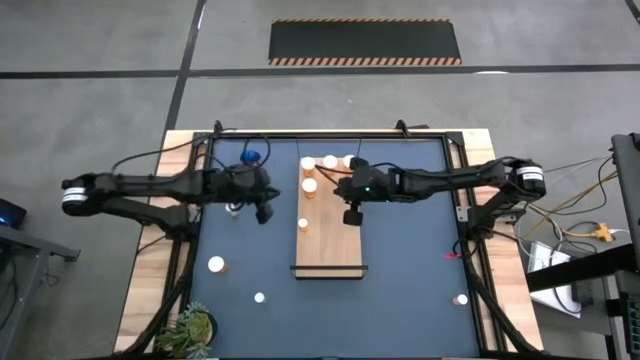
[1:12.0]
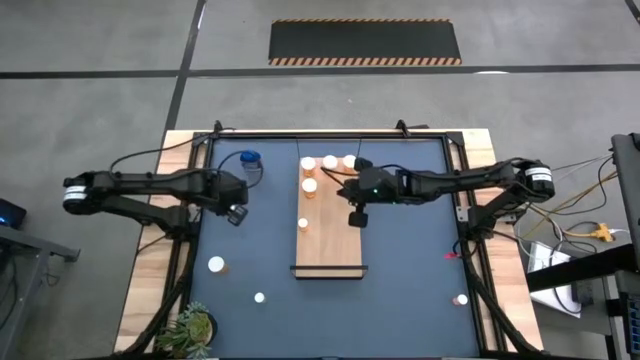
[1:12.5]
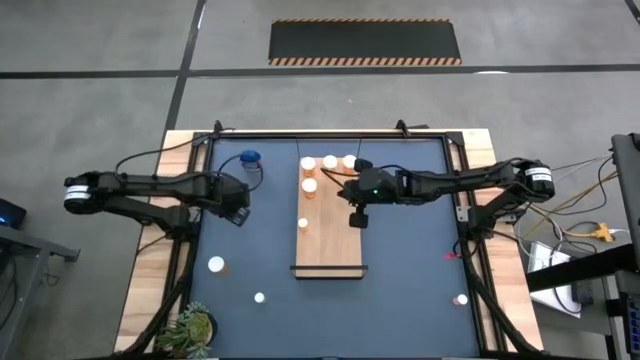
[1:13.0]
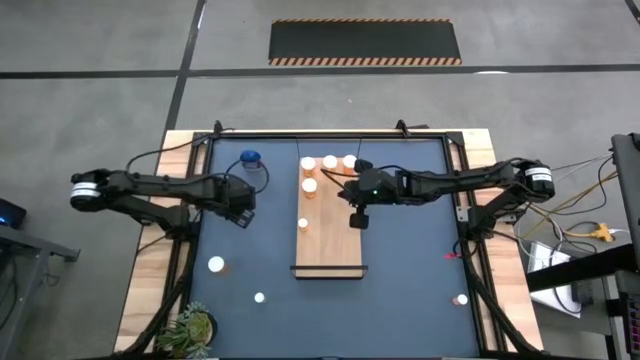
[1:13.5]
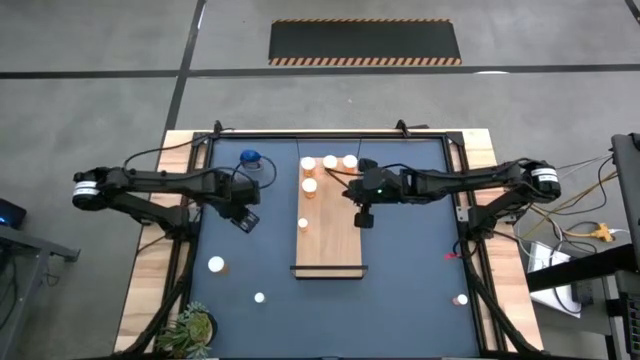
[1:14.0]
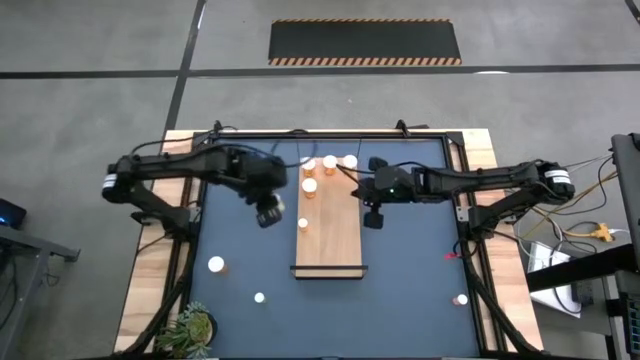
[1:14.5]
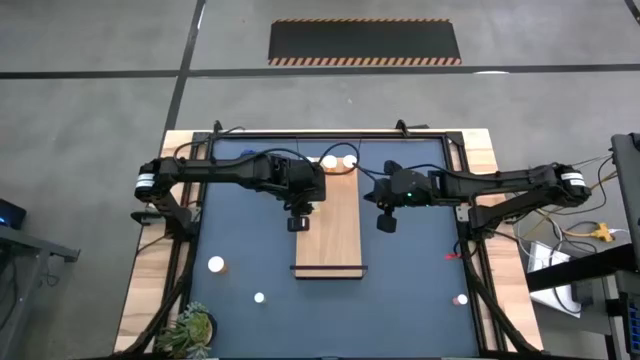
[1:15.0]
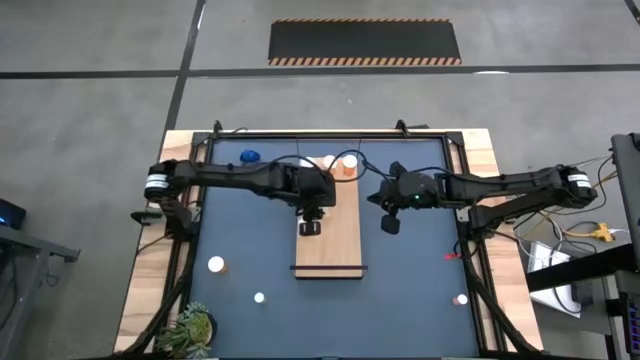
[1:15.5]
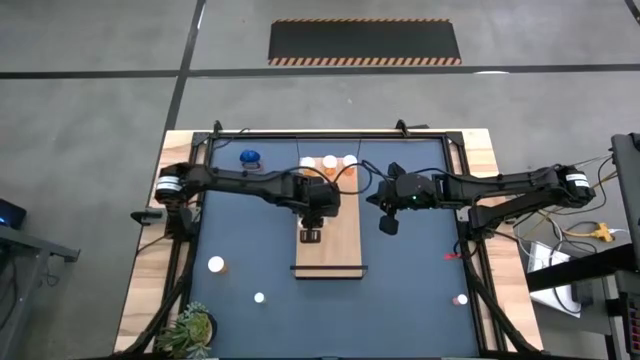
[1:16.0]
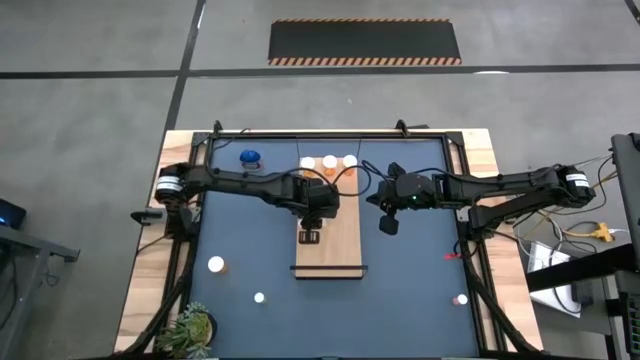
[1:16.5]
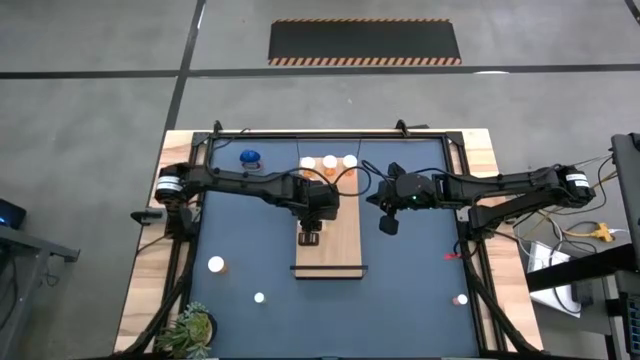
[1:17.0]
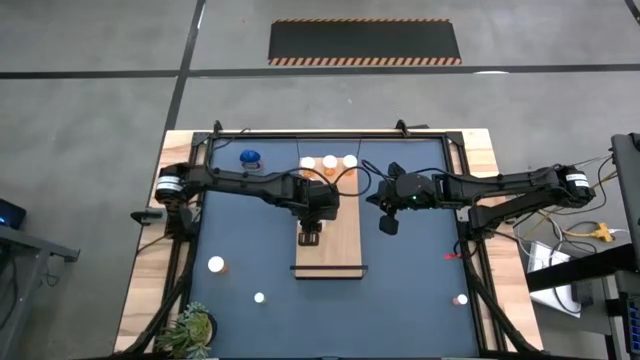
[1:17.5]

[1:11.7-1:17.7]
Task: Pick and place medicine bottles onto shelf by color
Put the small yellow pill bottle on the shelf

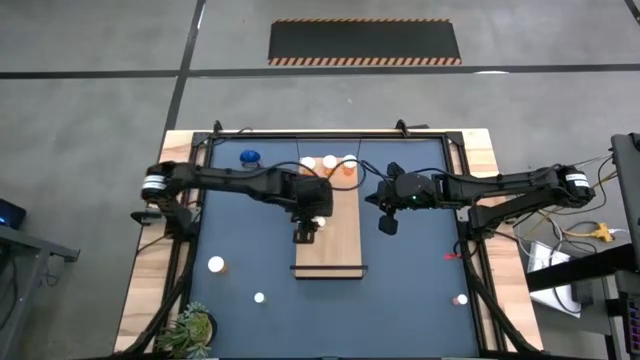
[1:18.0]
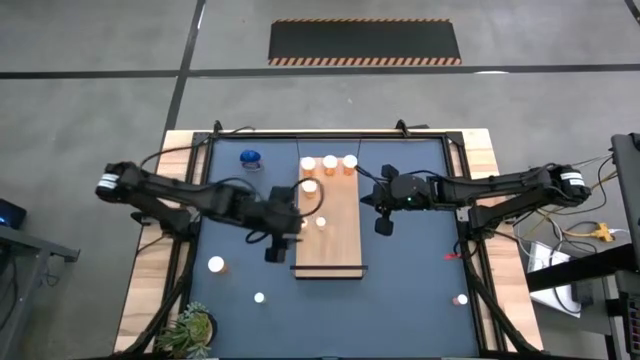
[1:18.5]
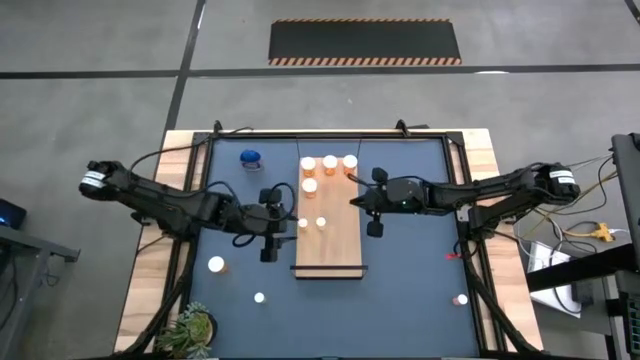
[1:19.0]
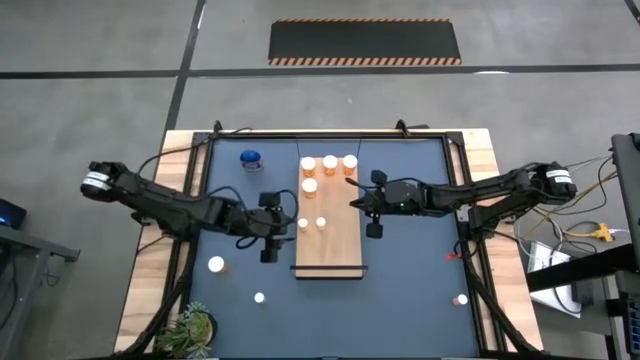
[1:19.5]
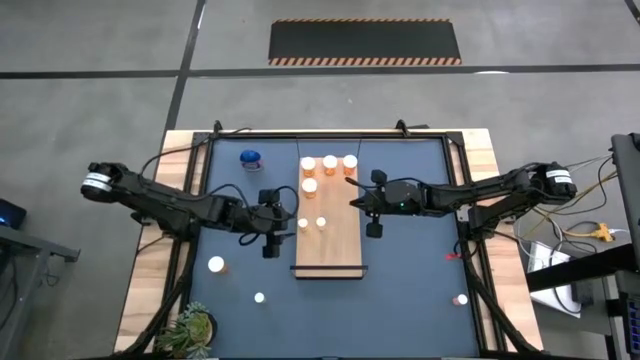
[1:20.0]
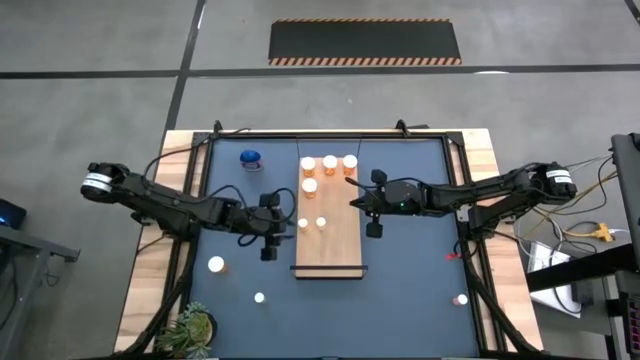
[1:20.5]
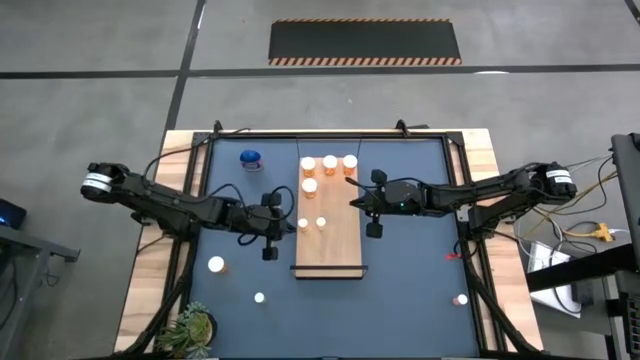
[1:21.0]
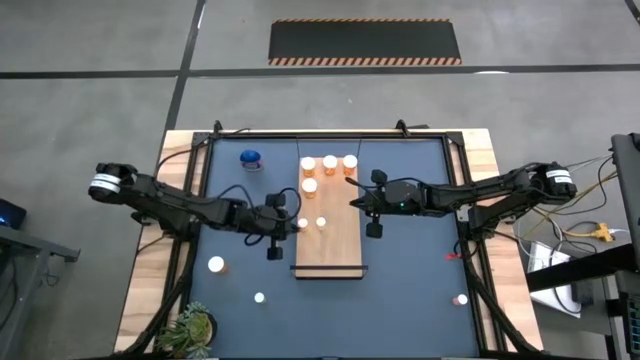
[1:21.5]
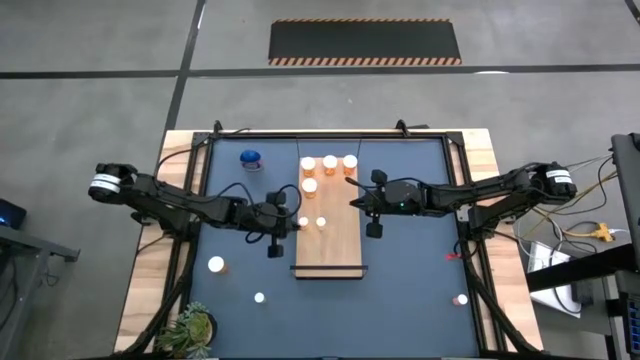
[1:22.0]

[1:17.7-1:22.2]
Adjust the small orange pill bottle on the shelf

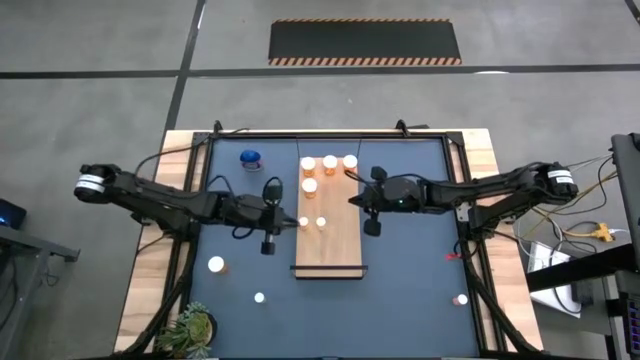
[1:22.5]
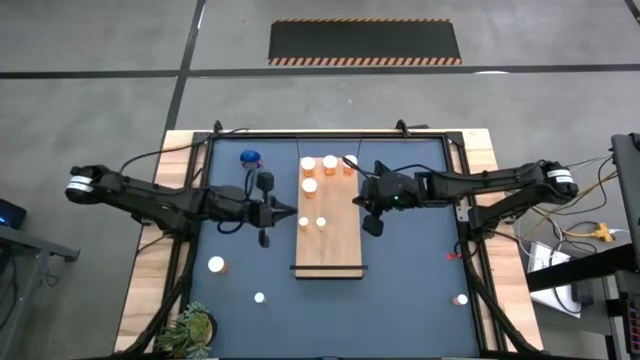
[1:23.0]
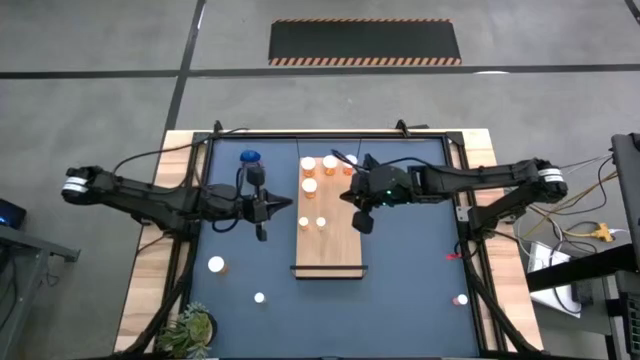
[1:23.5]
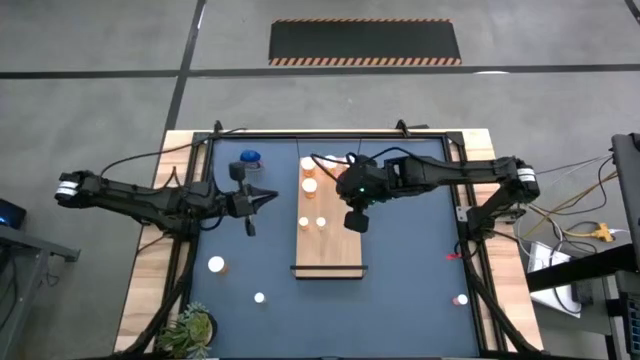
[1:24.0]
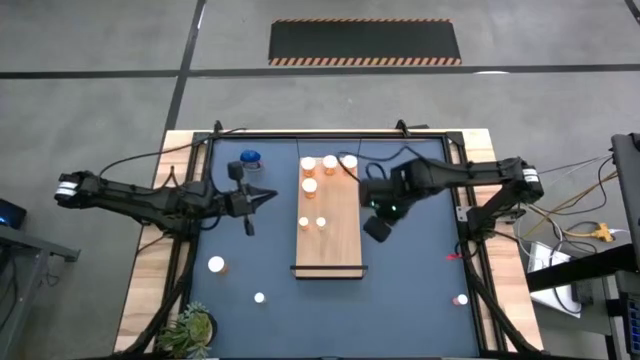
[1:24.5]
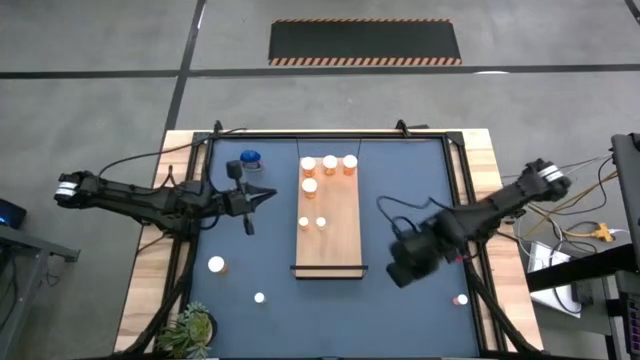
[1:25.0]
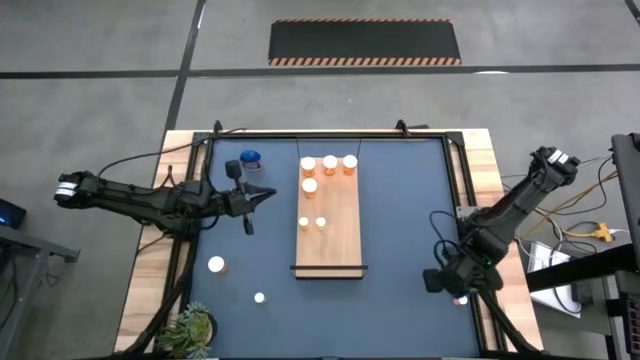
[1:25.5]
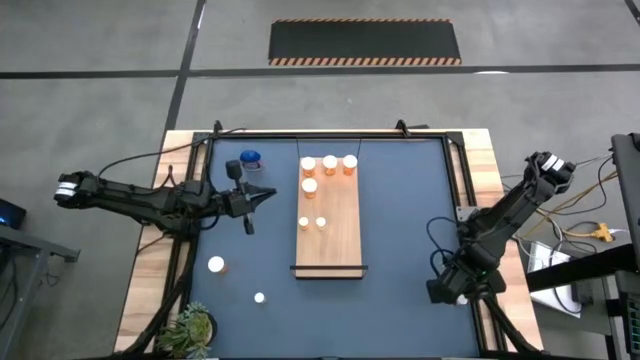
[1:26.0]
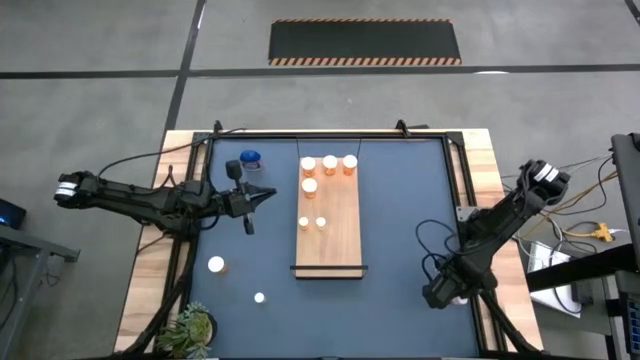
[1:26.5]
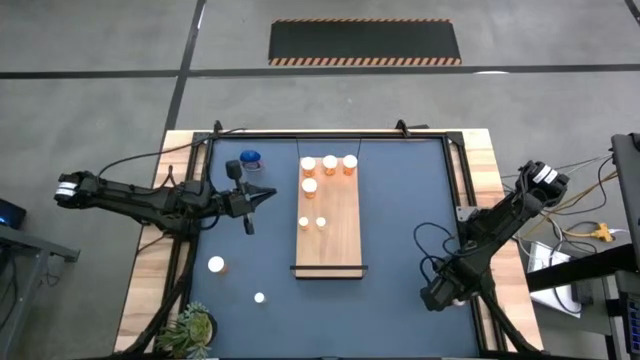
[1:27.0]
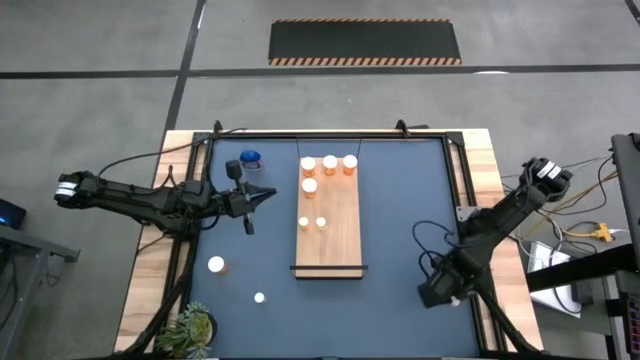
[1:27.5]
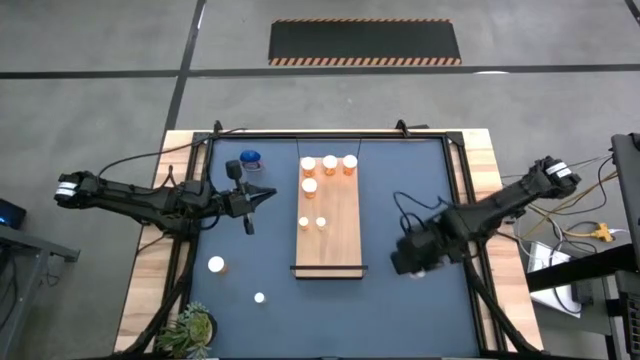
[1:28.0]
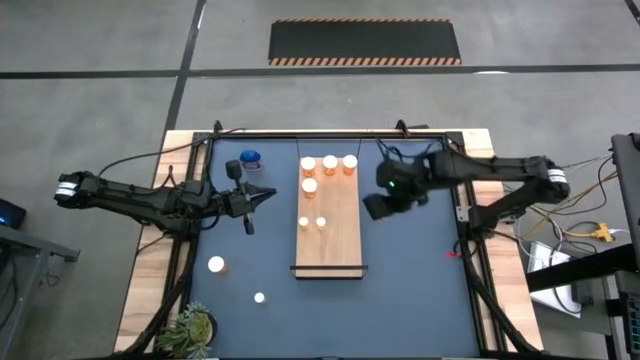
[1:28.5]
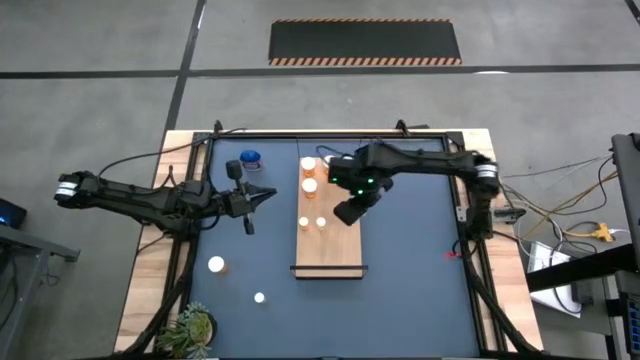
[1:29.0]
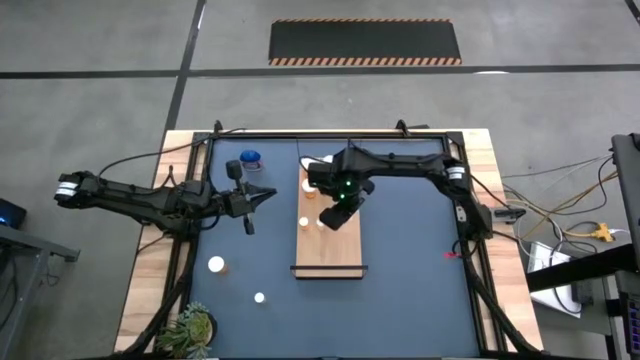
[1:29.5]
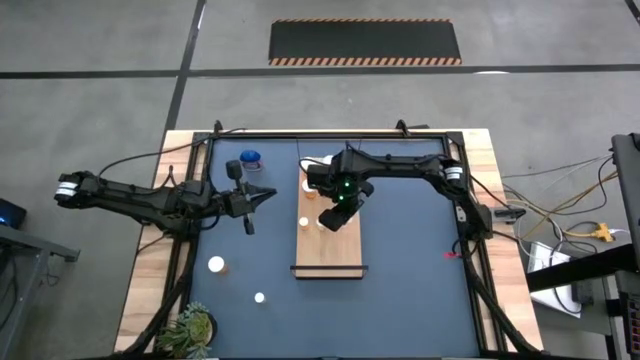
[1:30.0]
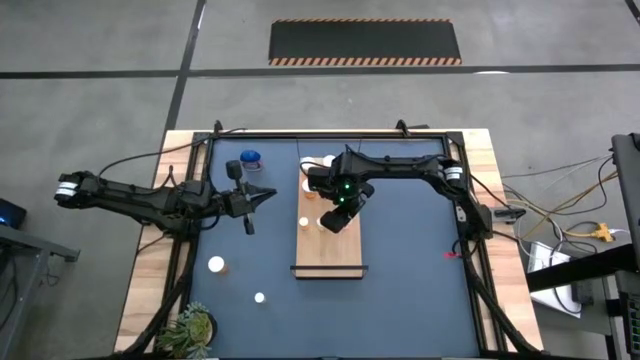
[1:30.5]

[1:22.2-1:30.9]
Put the small pink pill bottle on the shelf

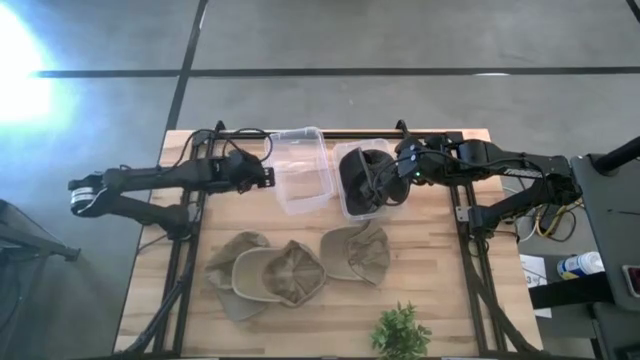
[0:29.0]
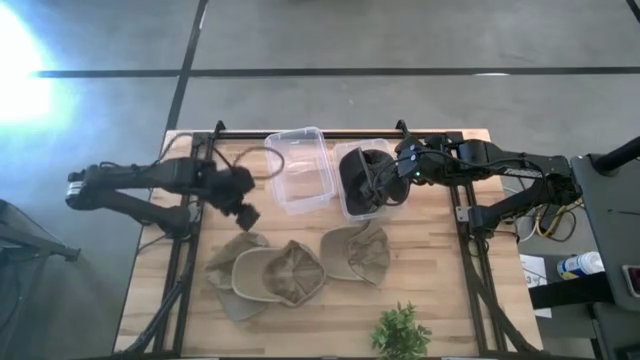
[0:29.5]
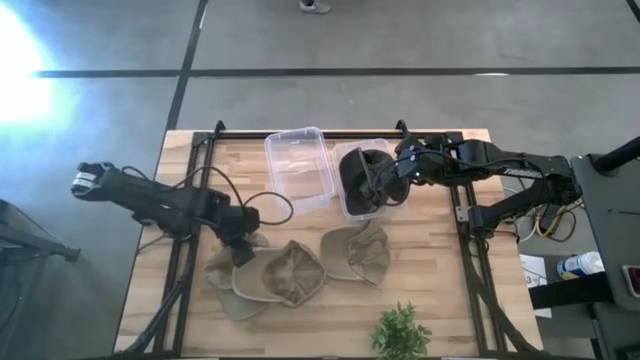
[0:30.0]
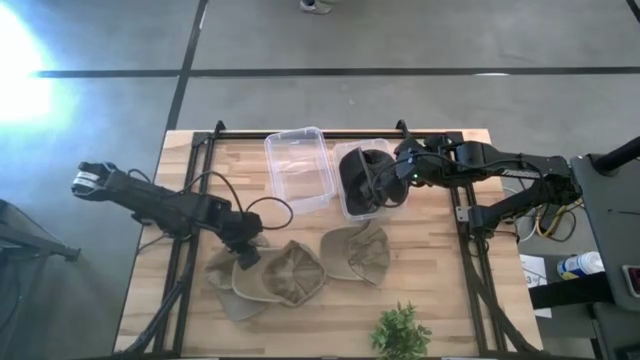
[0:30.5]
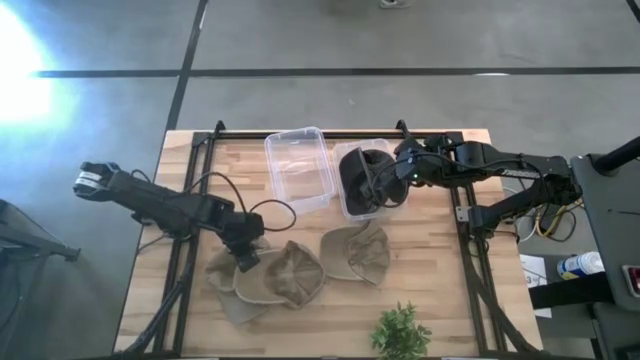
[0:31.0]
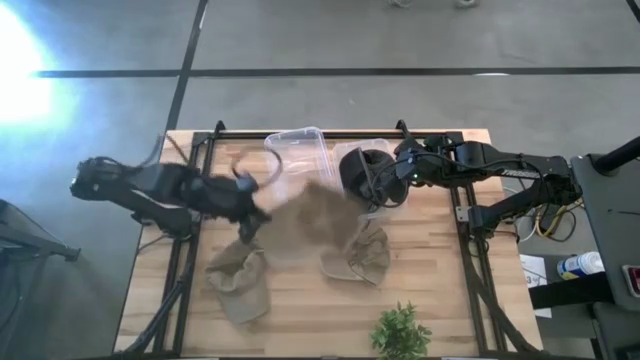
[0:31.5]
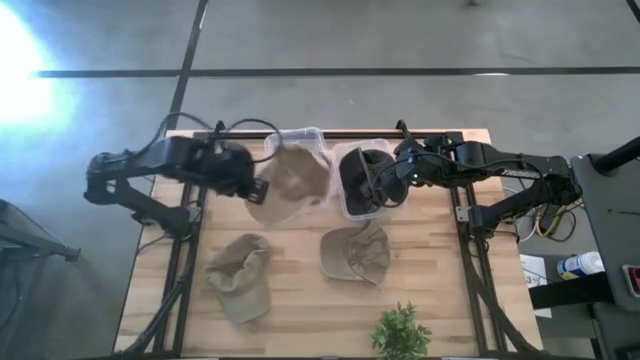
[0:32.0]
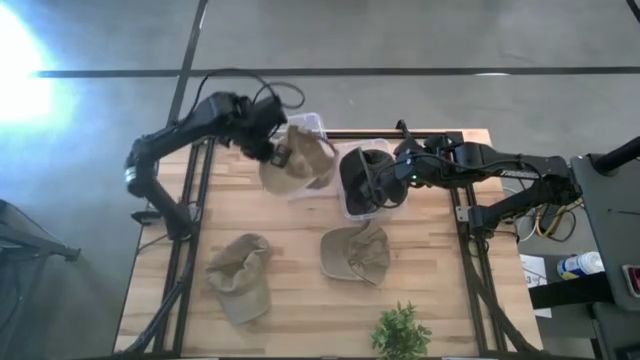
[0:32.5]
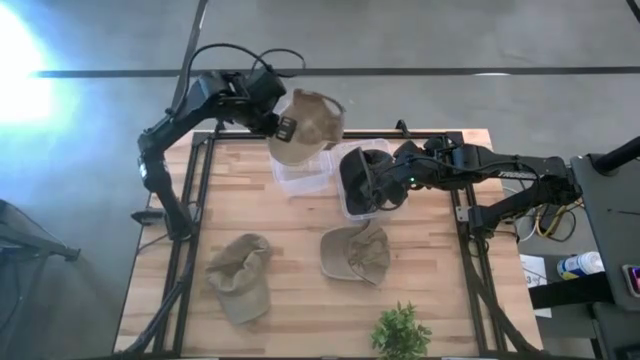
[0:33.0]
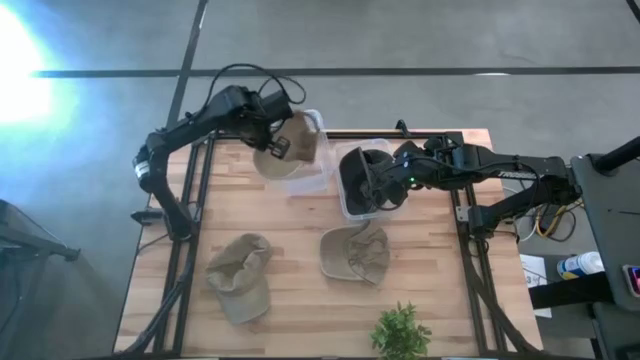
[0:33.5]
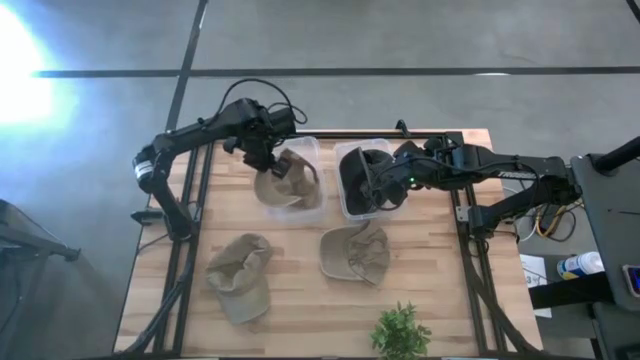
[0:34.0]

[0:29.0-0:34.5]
Task: Pick & Place hat
Put the middle brown cap into the left transparent bin
